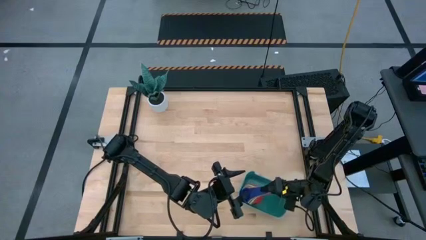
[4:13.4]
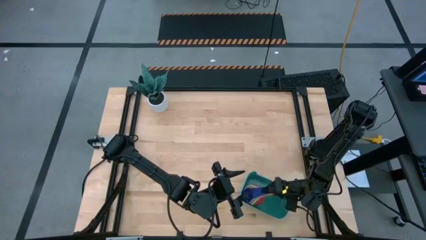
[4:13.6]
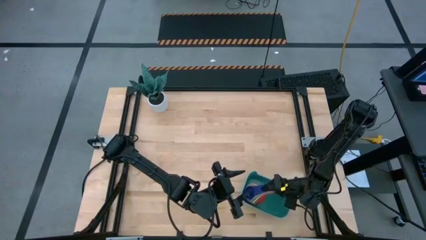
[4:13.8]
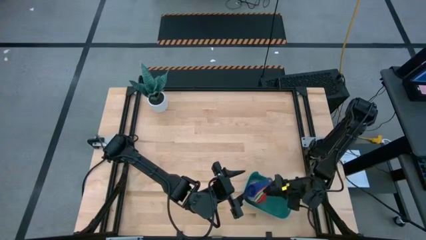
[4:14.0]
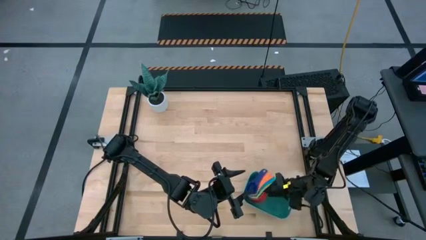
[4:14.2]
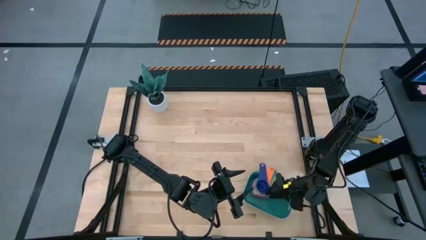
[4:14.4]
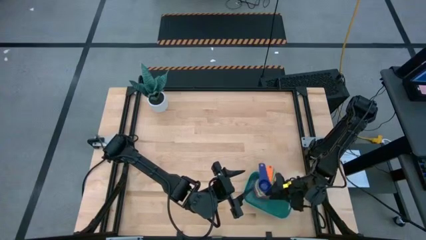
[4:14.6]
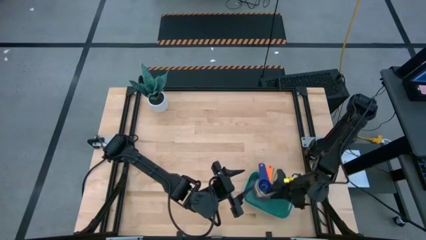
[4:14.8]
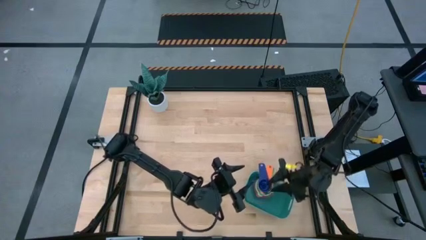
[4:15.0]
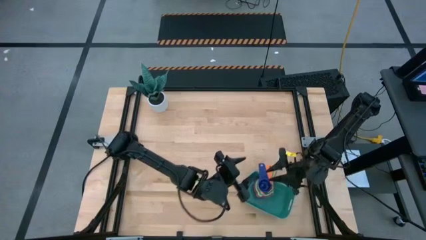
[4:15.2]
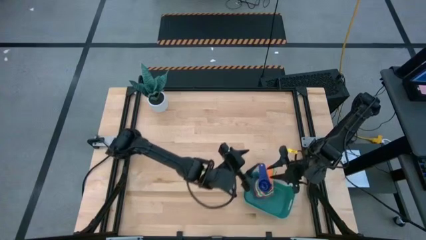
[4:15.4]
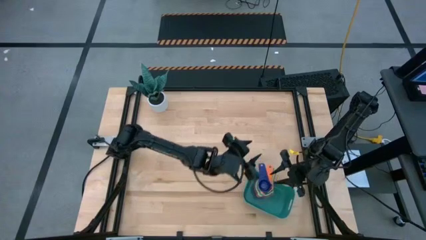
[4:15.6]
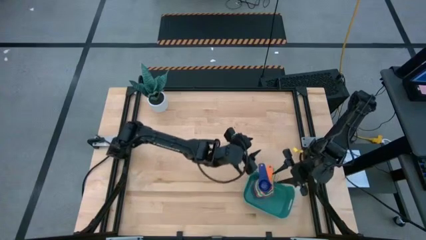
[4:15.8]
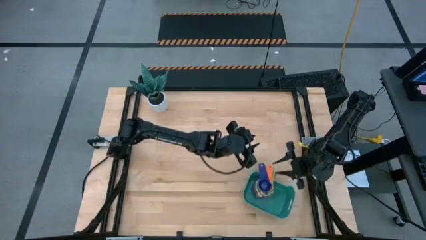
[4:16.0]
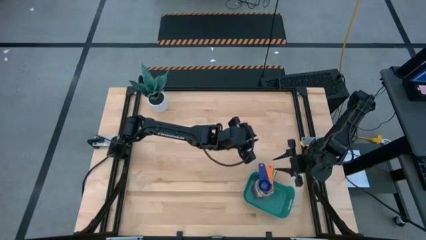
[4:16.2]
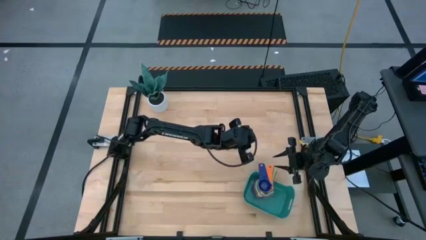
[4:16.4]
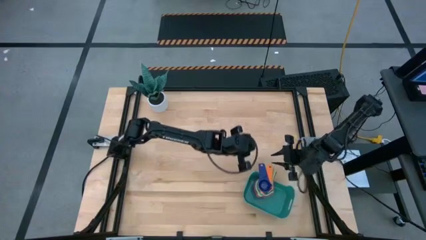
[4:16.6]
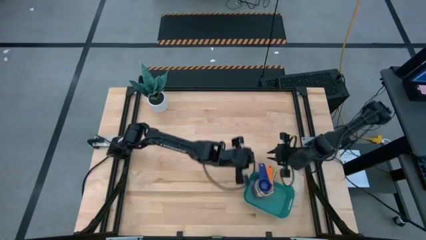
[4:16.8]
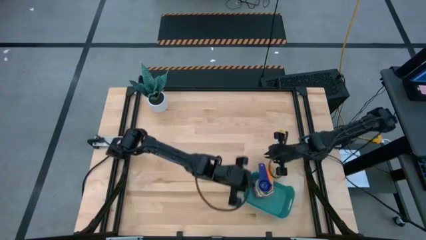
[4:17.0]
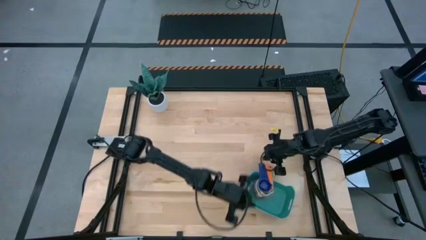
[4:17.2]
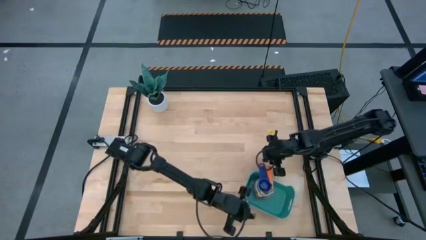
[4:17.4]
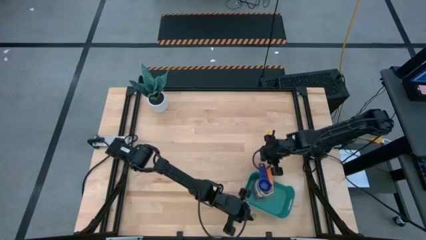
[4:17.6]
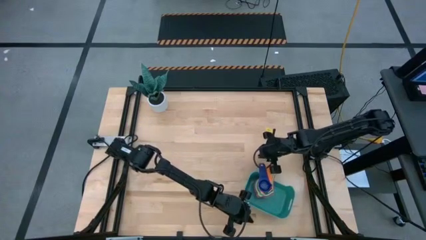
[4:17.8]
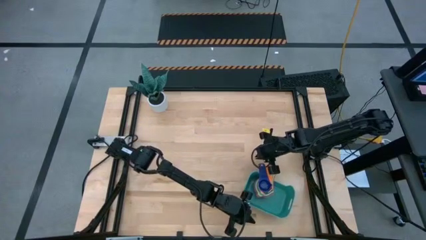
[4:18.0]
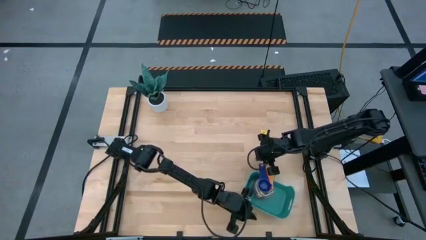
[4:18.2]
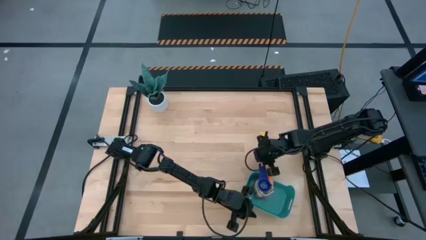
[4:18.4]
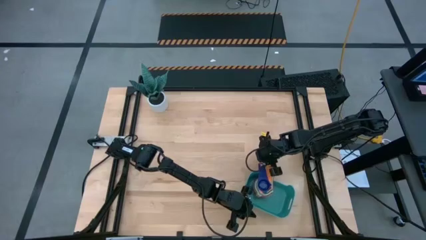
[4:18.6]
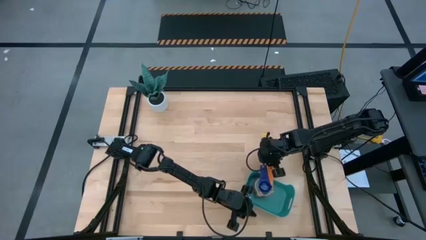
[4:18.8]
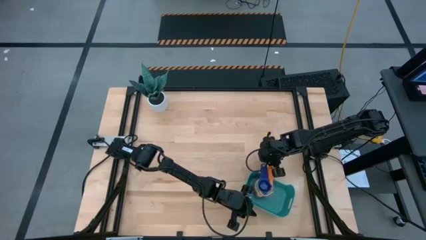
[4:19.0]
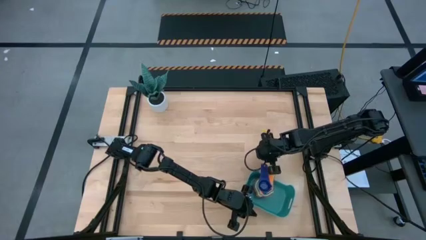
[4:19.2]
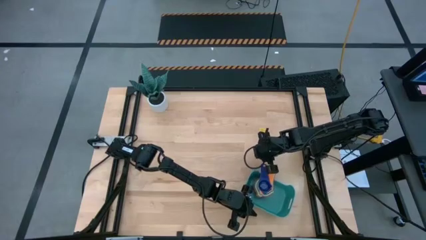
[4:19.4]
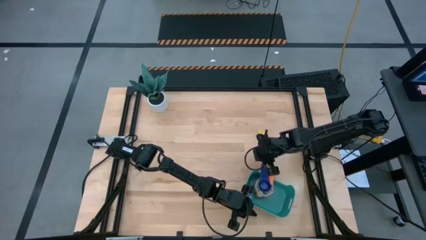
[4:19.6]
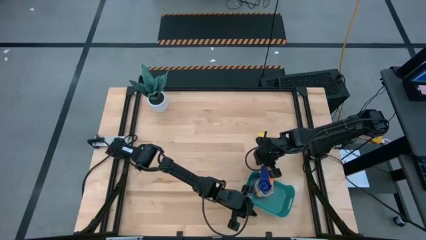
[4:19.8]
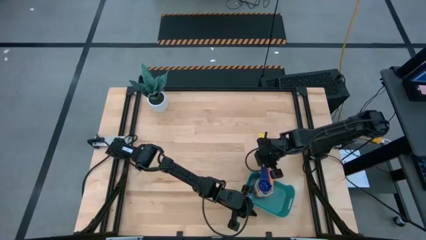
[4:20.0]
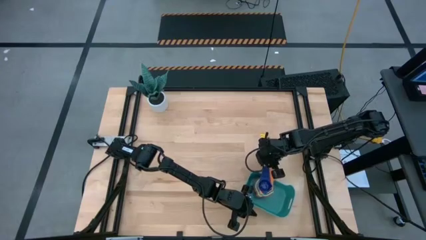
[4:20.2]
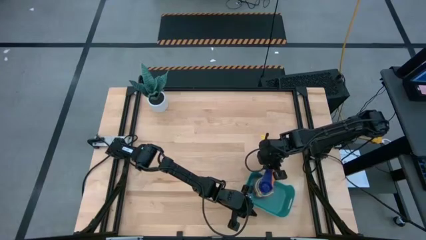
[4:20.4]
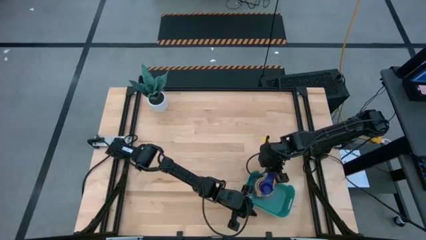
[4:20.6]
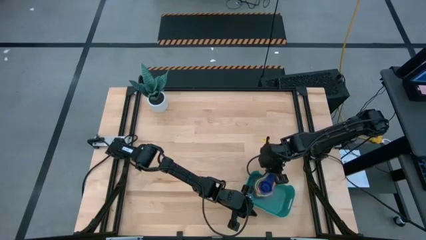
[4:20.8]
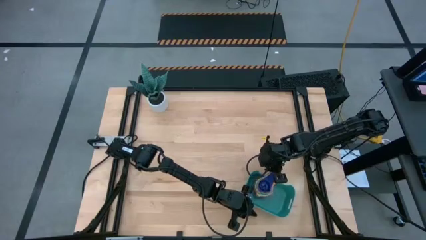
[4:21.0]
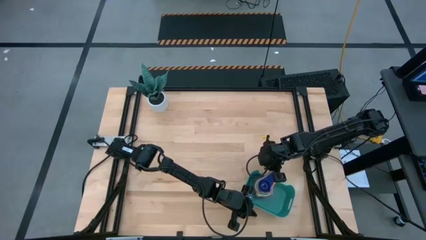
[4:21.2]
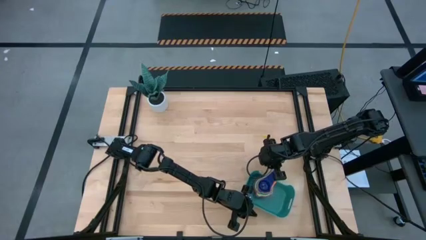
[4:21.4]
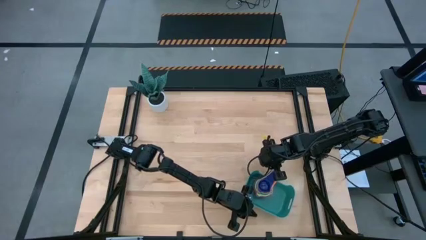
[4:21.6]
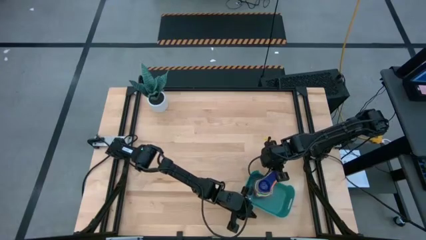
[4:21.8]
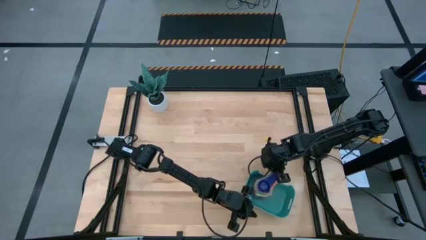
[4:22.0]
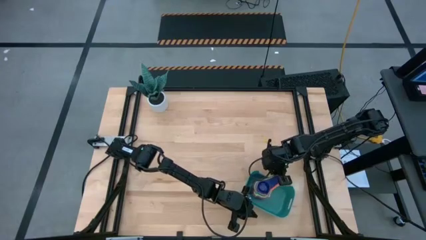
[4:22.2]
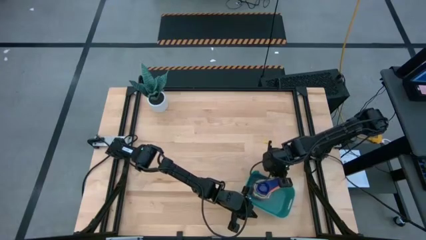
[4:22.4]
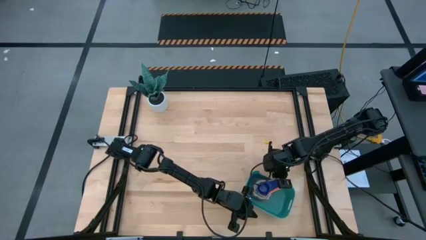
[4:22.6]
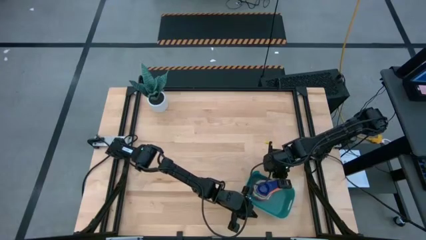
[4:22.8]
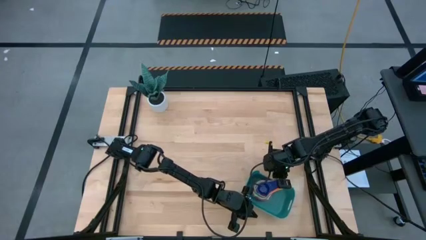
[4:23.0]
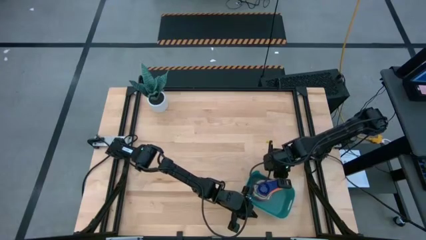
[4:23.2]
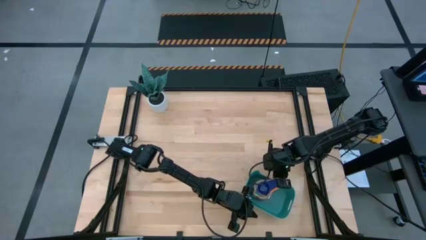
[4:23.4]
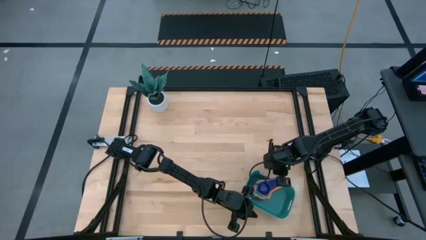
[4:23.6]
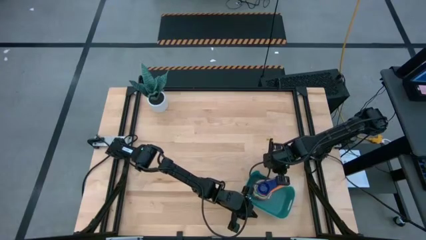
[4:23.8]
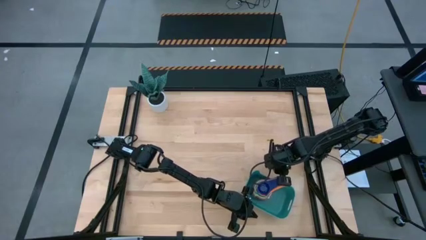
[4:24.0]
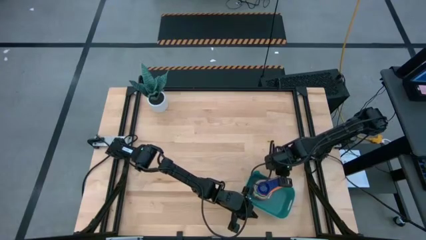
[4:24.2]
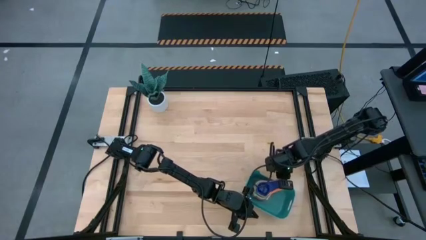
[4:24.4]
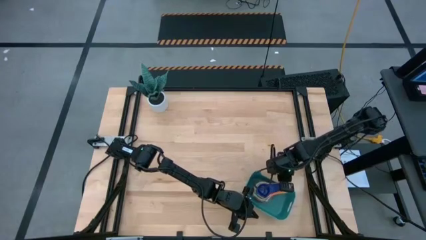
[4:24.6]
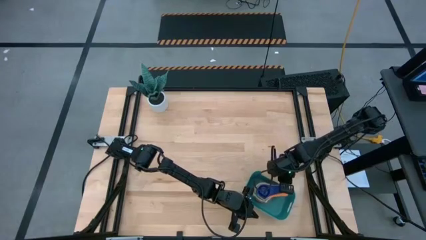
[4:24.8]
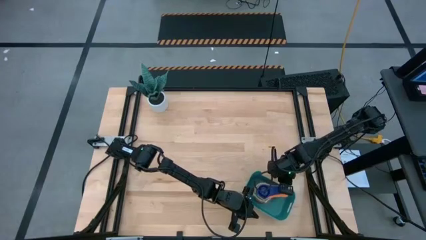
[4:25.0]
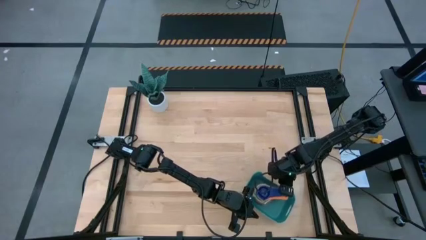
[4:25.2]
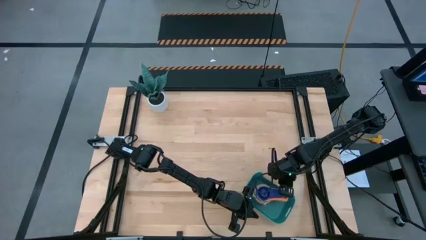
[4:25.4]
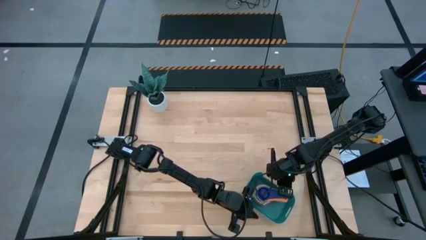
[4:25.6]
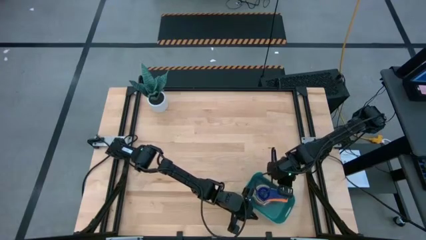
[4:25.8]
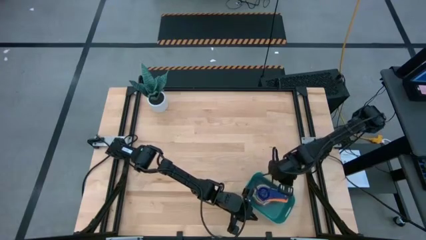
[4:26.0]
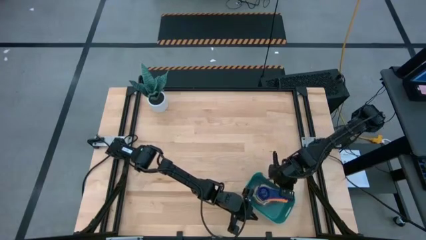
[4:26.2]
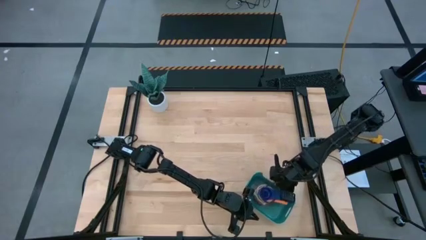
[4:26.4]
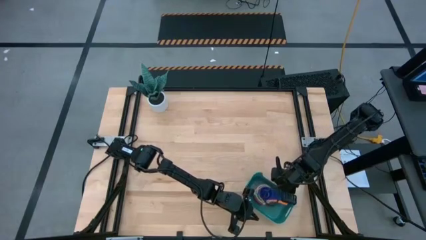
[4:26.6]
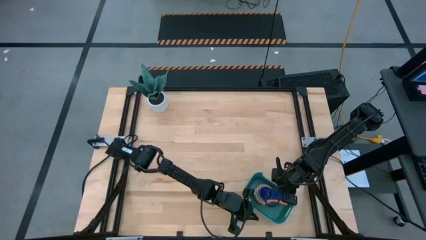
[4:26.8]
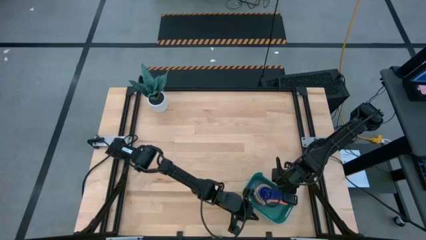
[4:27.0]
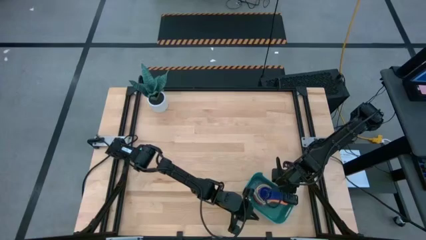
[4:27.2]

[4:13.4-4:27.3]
Task: Nest measuring cups in basket
Put the nested measuring cups into the green bin

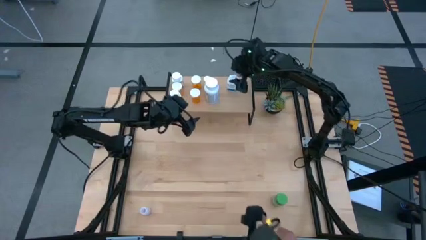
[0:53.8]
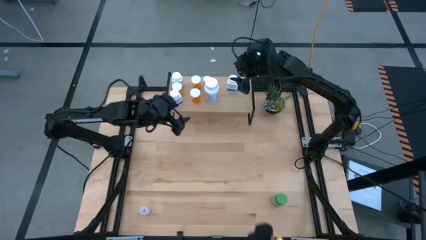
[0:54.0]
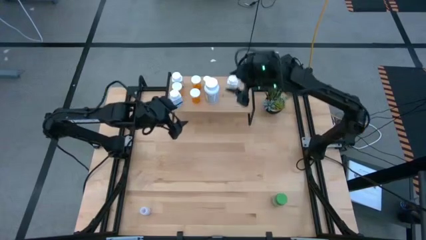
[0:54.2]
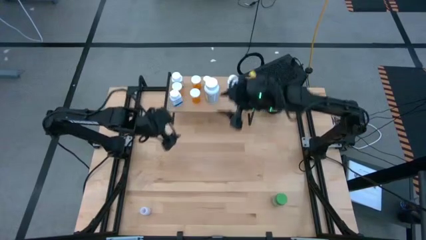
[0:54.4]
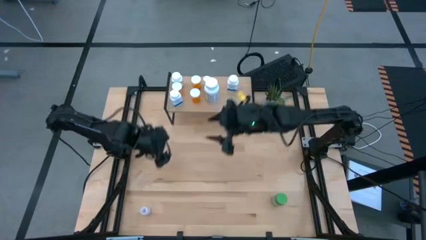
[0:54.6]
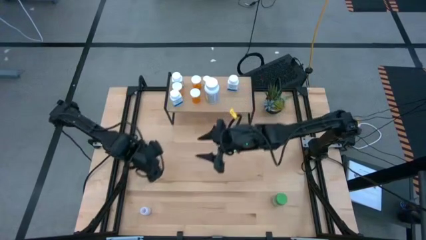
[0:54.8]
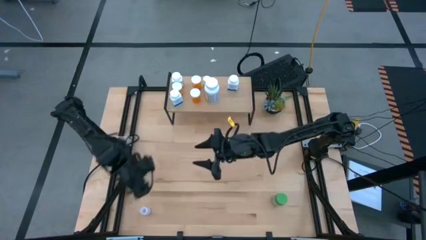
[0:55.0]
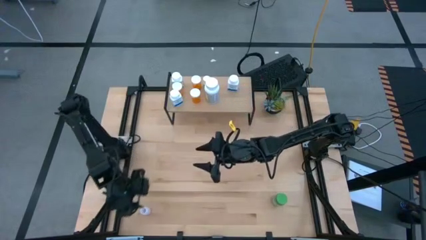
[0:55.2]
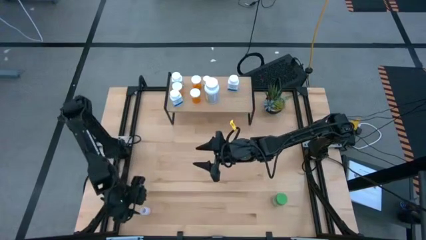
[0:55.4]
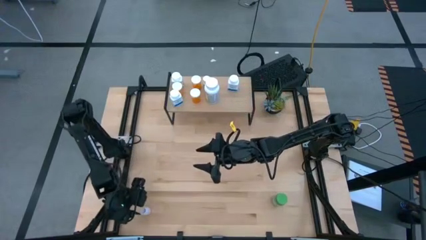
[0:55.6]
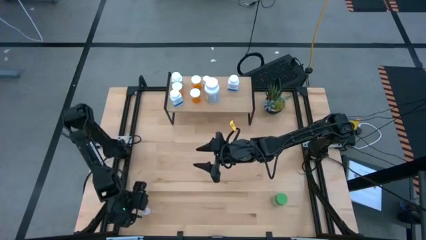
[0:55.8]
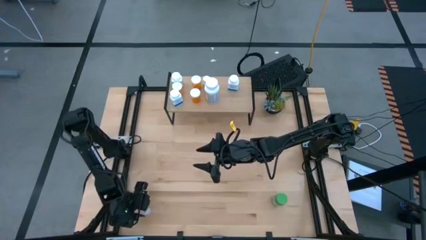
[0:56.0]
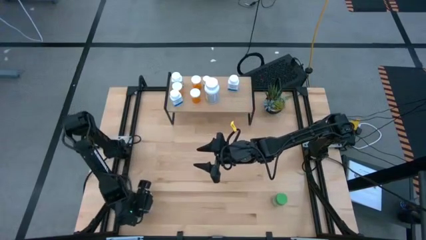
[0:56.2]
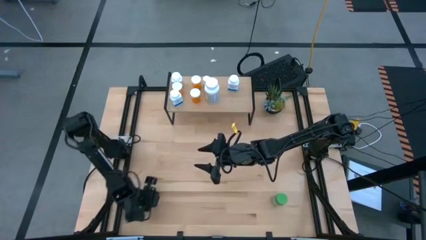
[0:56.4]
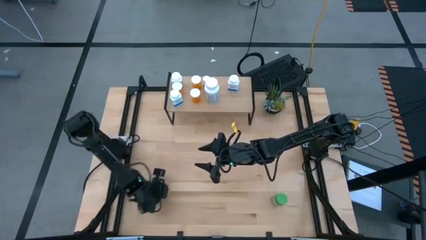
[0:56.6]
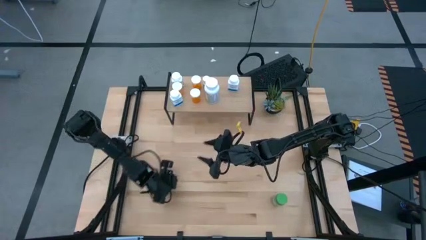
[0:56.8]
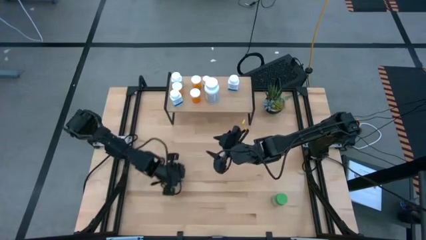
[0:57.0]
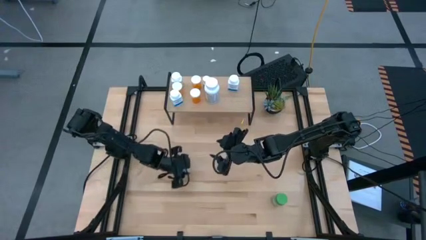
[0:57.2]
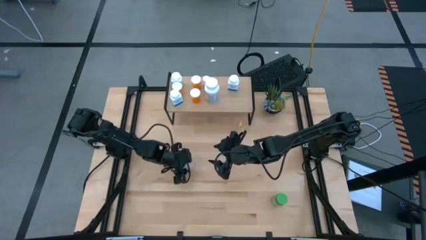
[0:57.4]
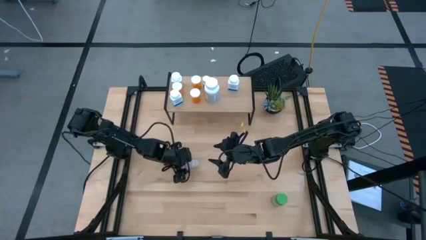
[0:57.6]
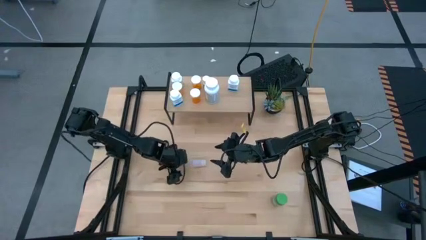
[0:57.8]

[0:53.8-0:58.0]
Task: Pick and place medicine bottles onto shelf by color
Put the transparent pill bottle on the shelf
